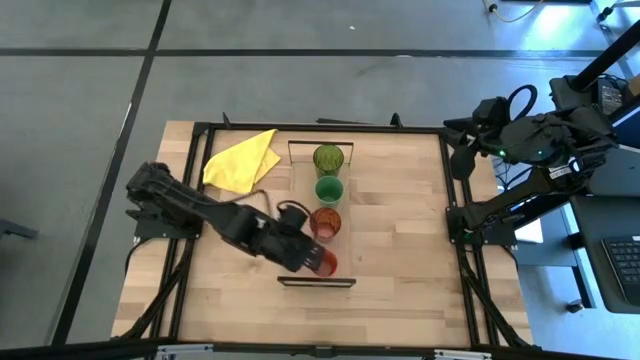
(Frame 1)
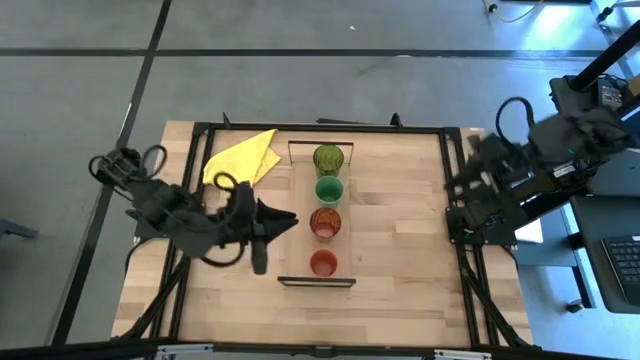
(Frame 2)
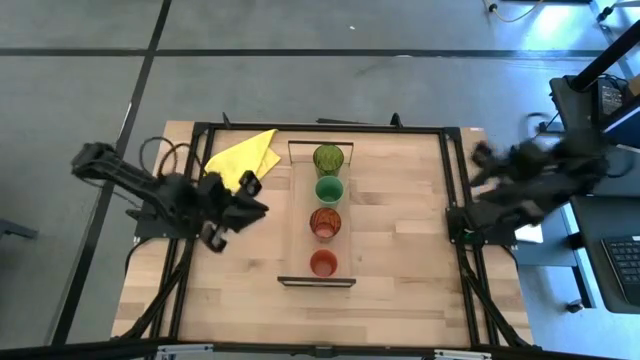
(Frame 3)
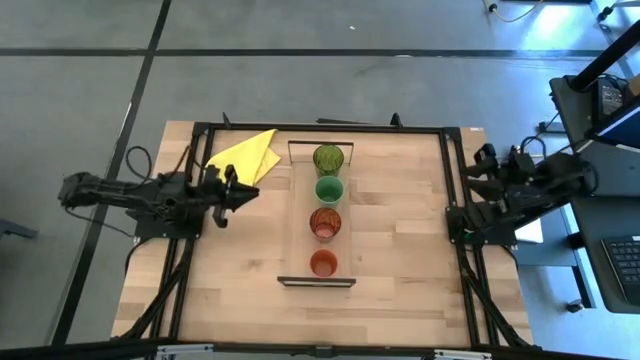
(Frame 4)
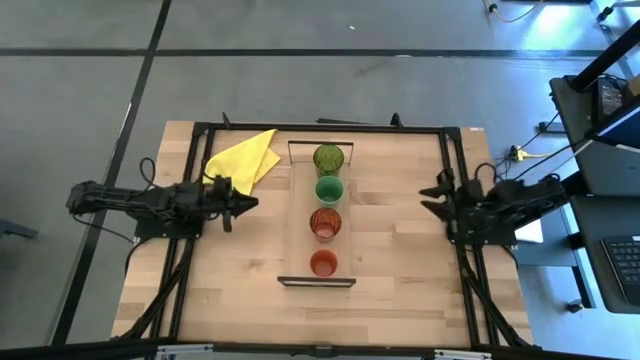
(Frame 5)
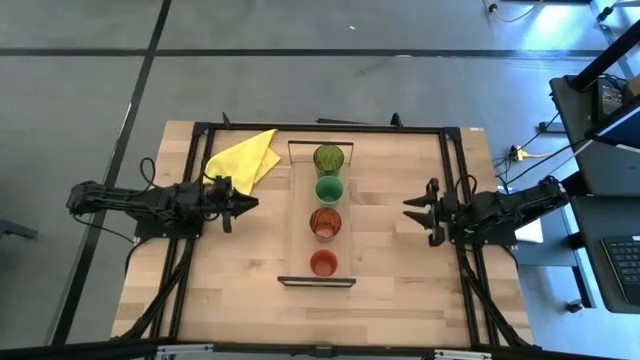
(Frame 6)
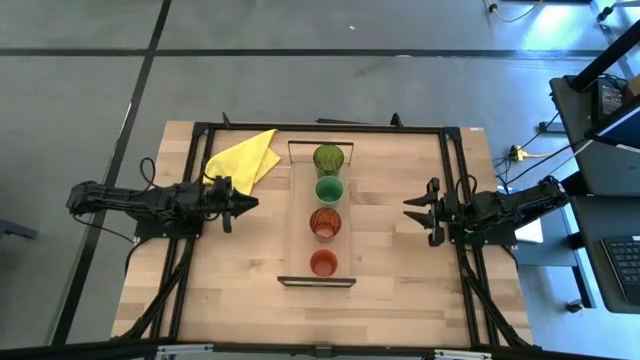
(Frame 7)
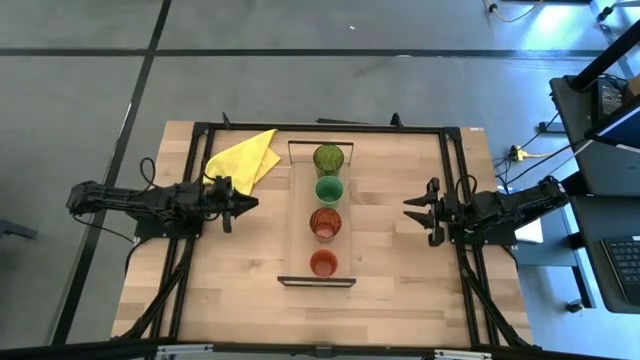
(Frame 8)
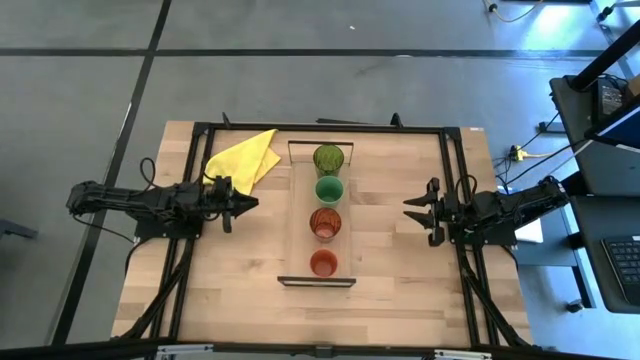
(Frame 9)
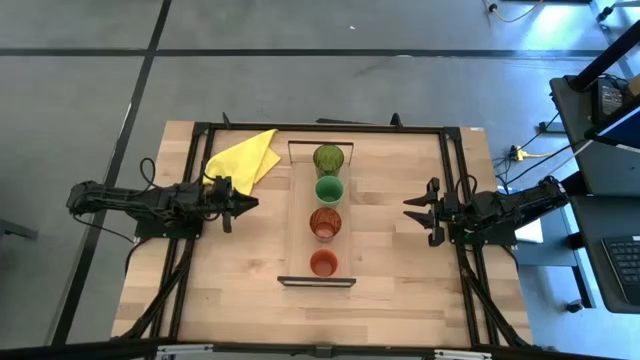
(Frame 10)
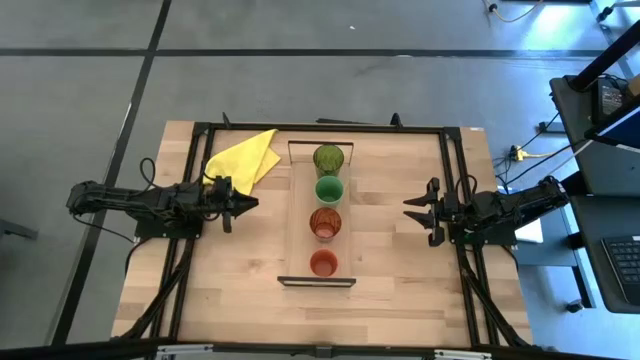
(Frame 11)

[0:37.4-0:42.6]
Task: Stack small to large cups/mugs on shelf
Return to Home Position

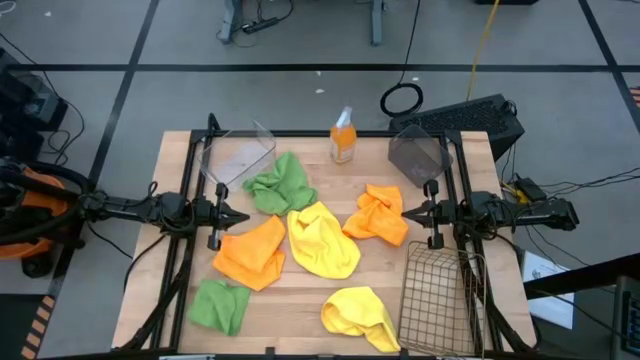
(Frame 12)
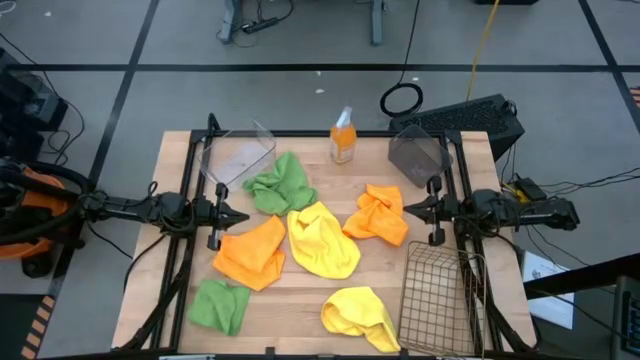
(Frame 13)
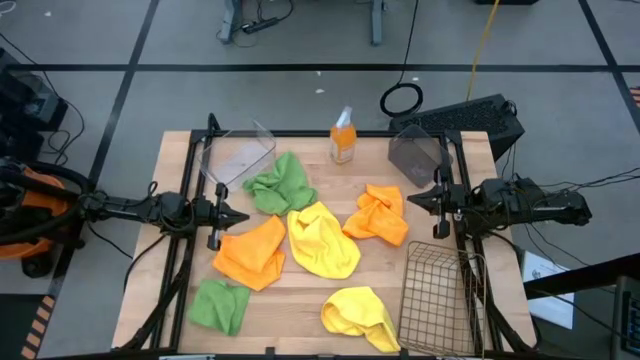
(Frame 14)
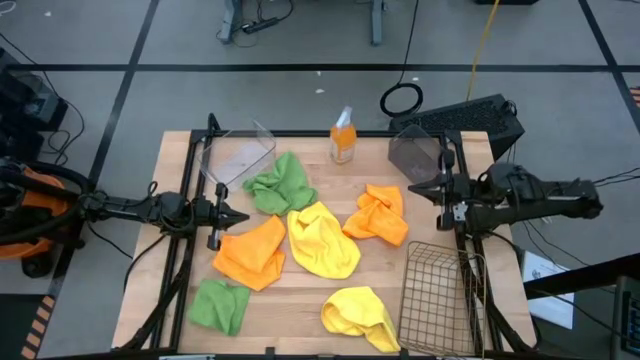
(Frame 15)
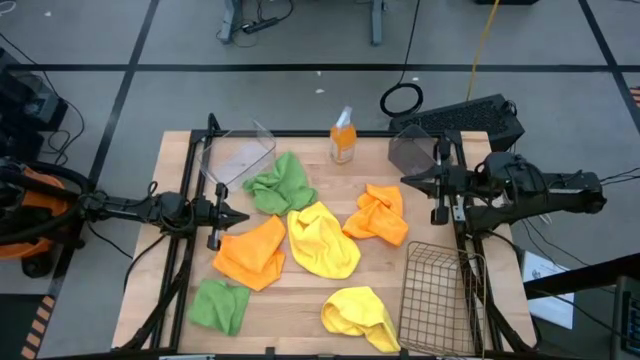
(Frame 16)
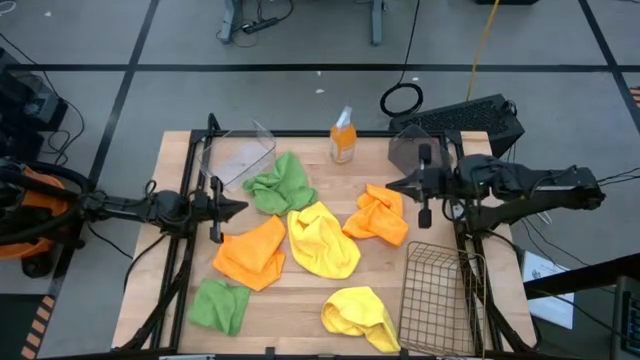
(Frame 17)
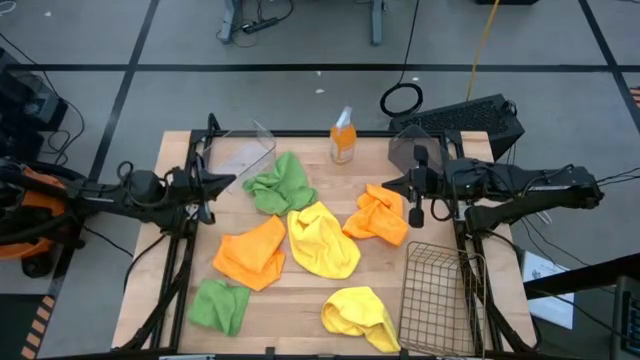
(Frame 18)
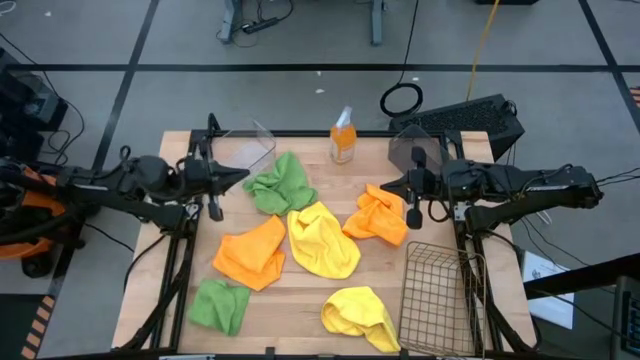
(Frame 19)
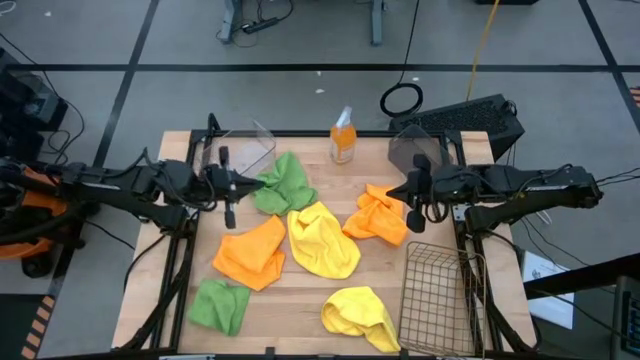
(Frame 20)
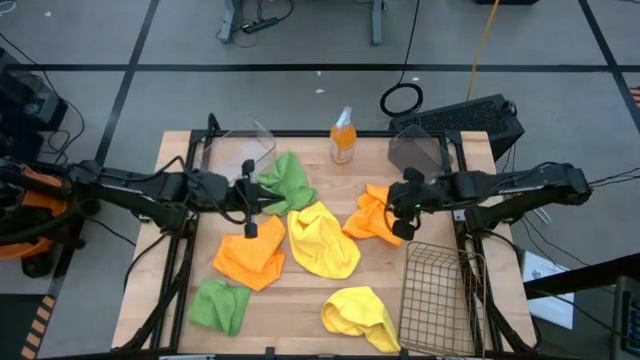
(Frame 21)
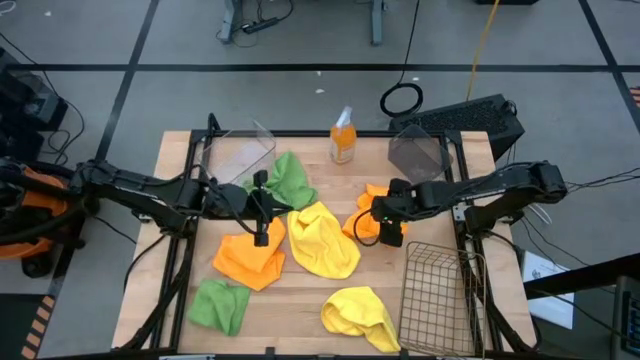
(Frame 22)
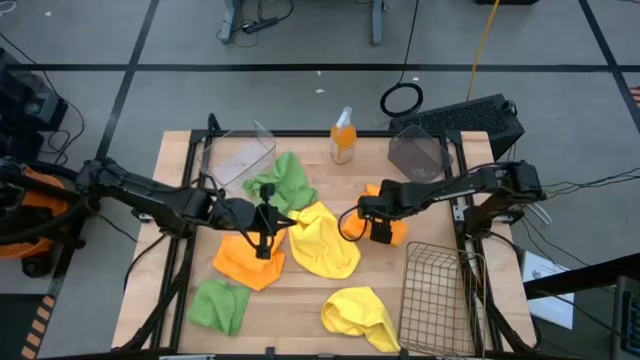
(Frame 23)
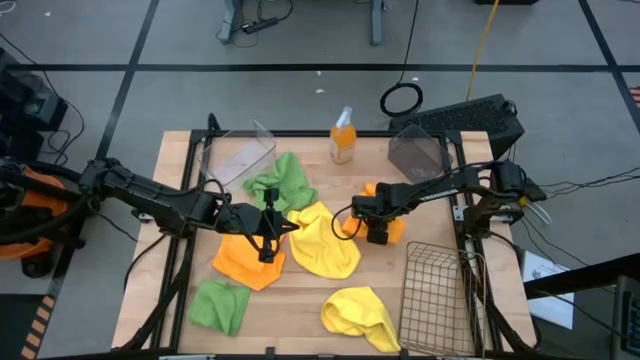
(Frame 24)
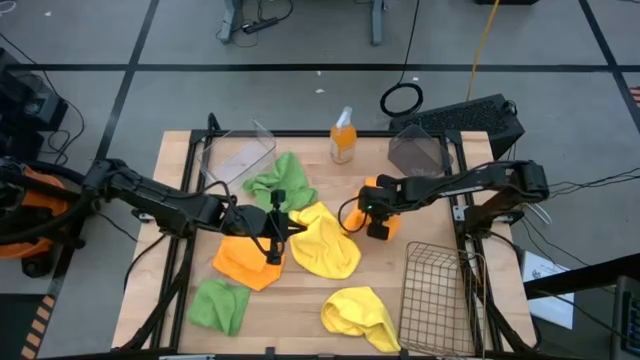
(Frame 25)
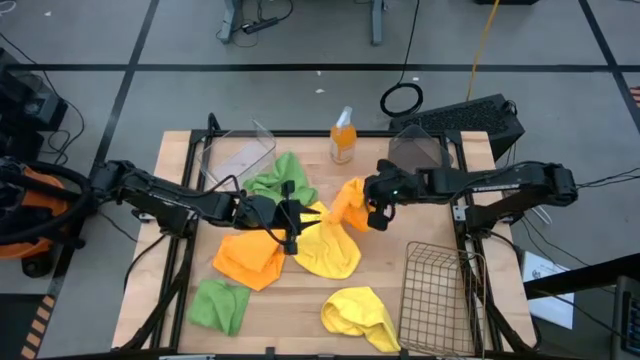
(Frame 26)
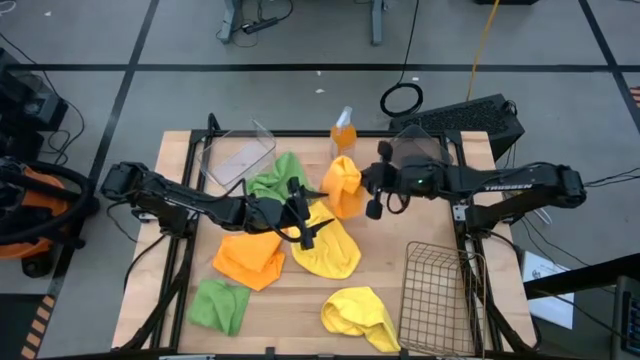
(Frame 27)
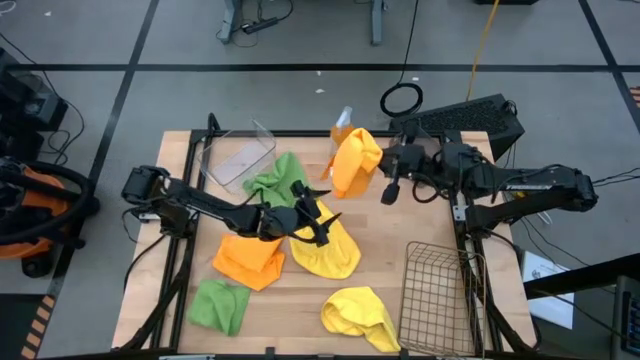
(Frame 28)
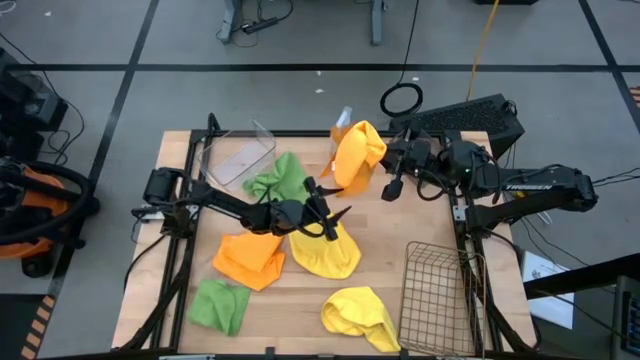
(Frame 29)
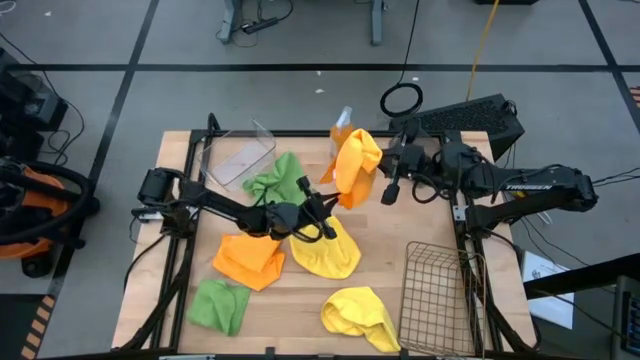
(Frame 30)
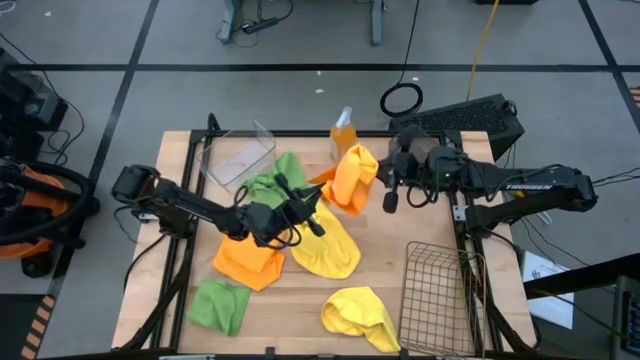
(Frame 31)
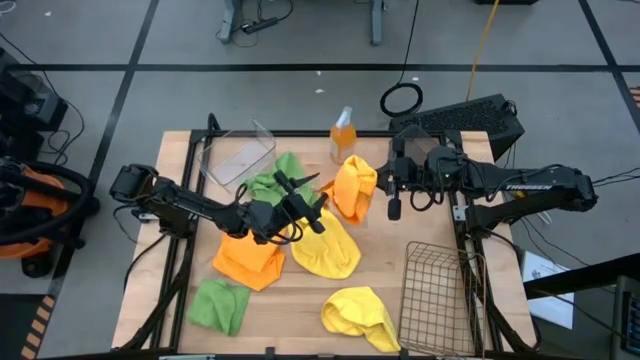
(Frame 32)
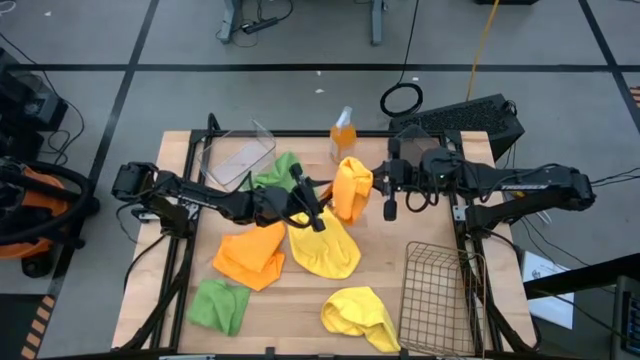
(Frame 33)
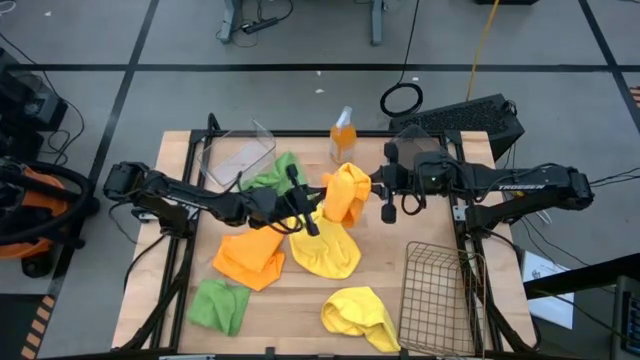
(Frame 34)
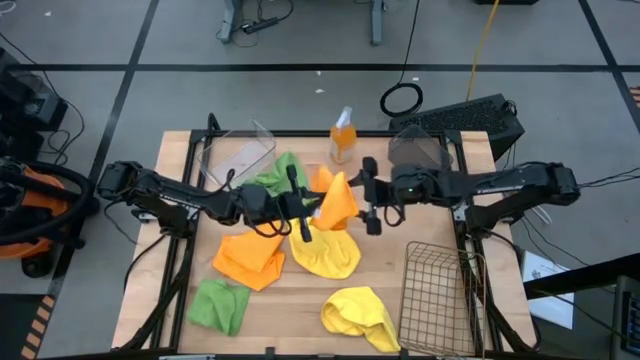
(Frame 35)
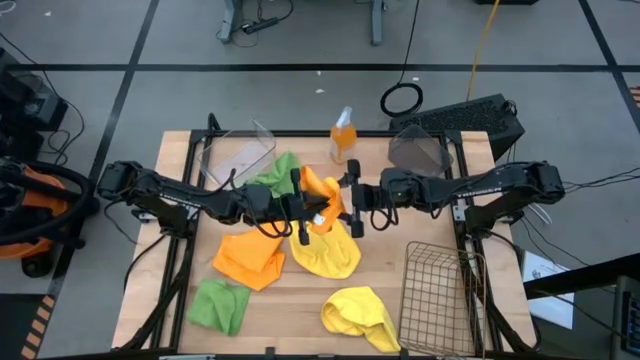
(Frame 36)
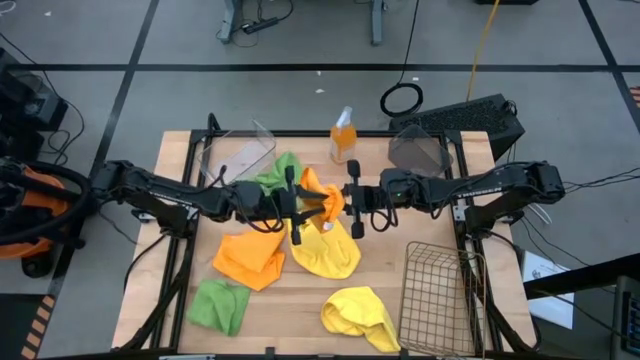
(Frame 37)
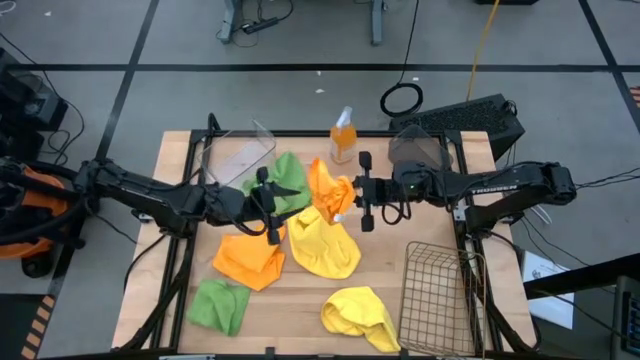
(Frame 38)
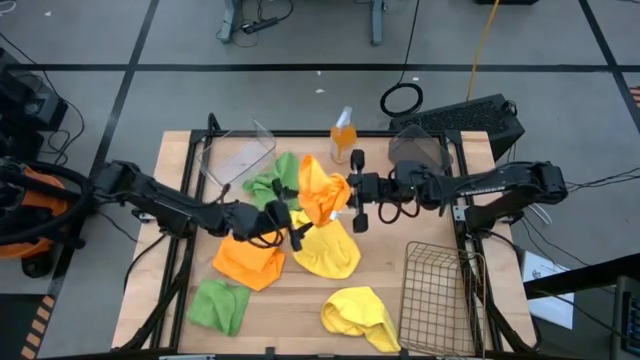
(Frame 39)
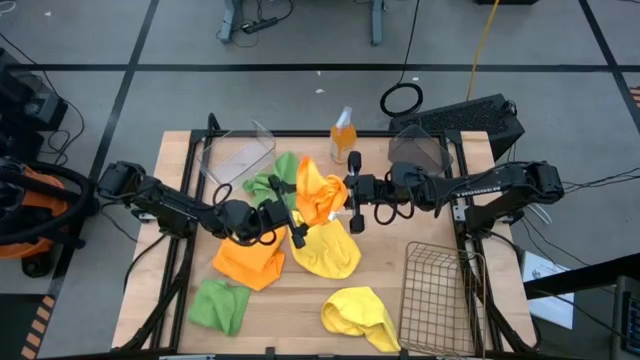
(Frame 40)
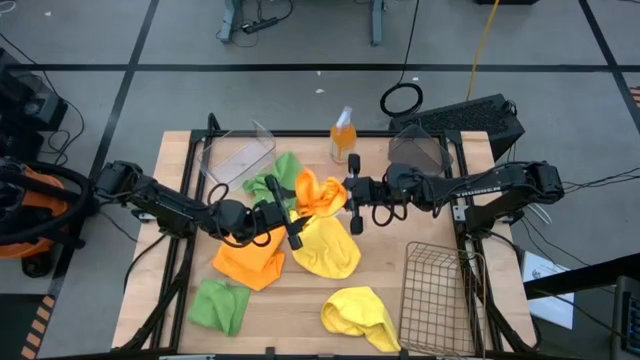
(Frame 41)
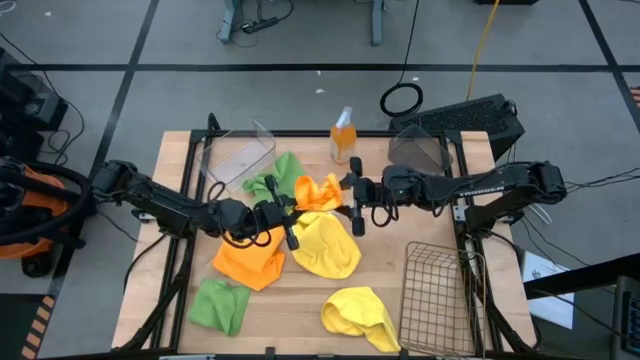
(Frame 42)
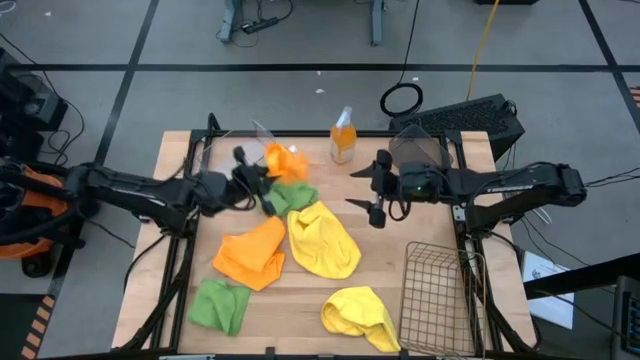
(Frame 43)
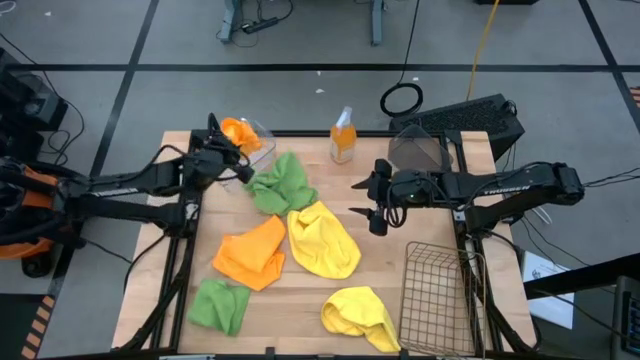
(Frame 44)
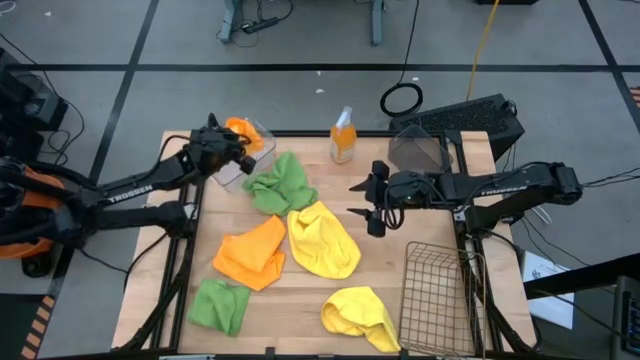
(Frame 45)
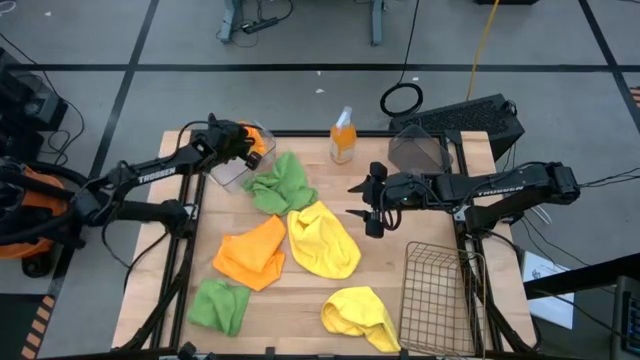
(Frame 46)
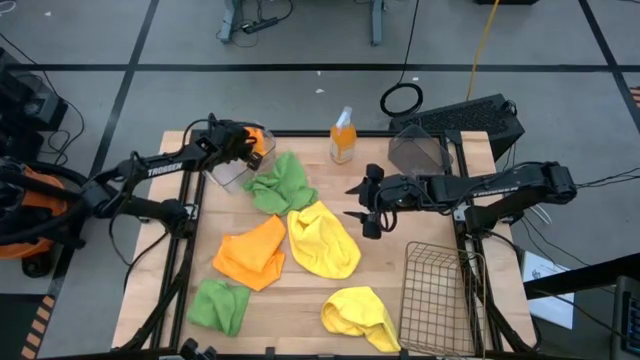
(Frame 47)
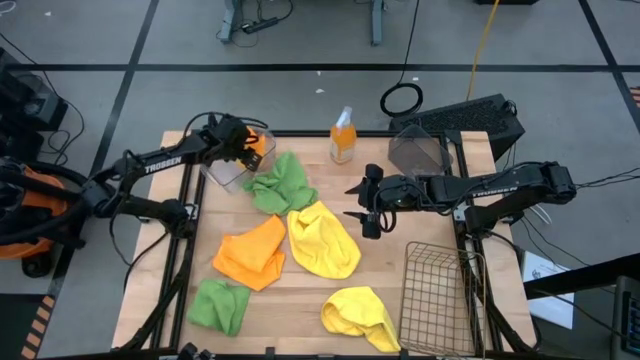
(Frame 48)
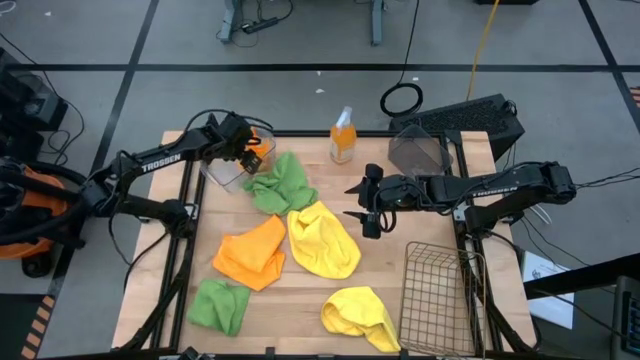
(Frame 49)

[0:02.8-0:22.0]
Task: Sort microfiber towel by color & place in baskets
Put the top orange microfiber cloth into the transparent bin
